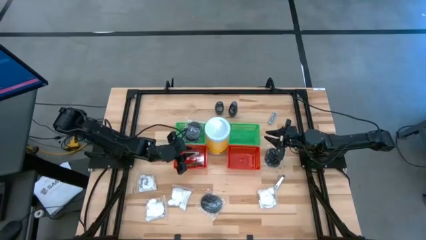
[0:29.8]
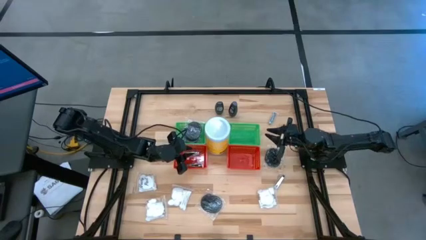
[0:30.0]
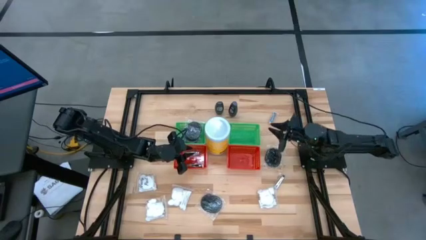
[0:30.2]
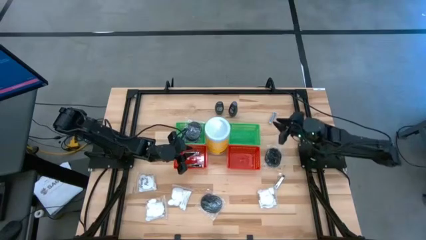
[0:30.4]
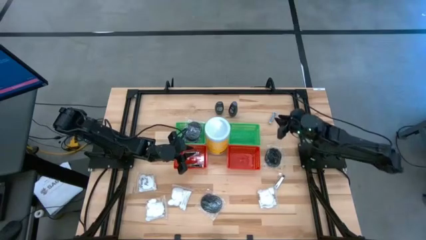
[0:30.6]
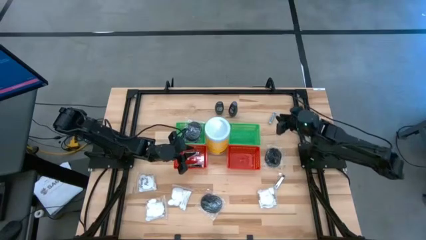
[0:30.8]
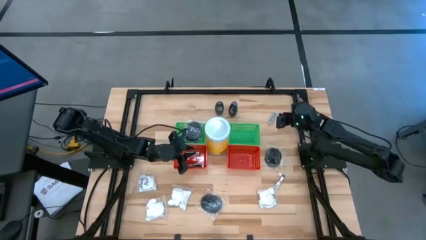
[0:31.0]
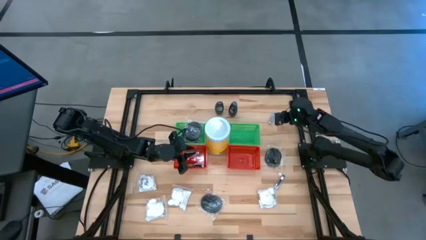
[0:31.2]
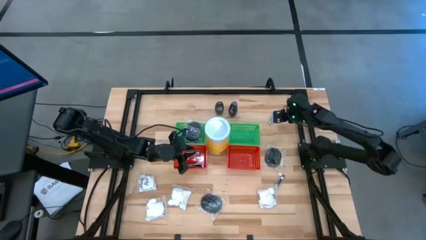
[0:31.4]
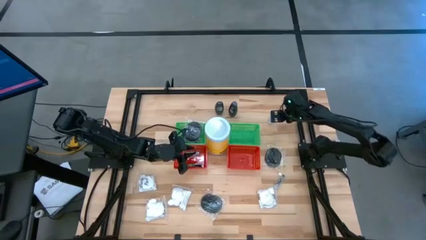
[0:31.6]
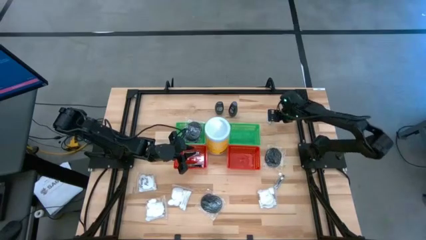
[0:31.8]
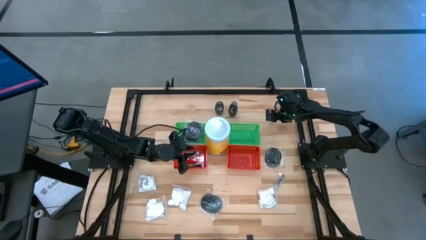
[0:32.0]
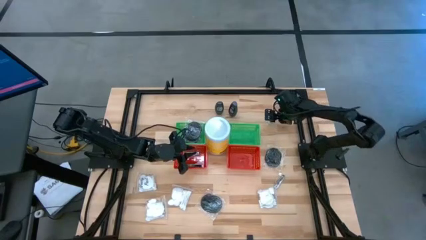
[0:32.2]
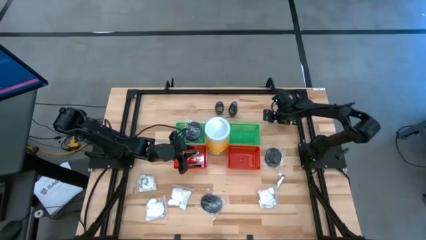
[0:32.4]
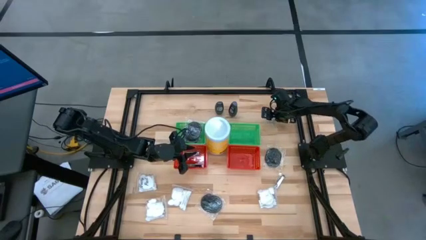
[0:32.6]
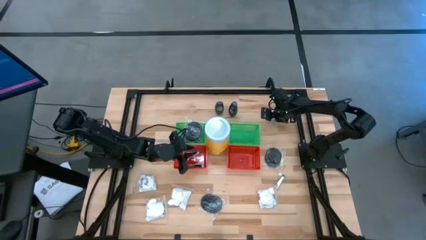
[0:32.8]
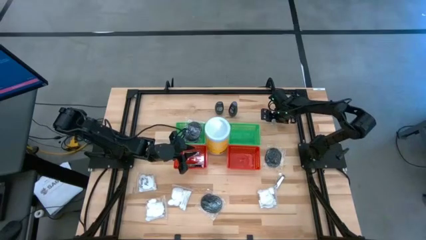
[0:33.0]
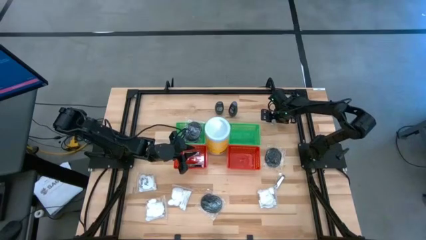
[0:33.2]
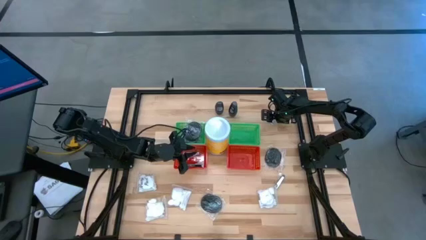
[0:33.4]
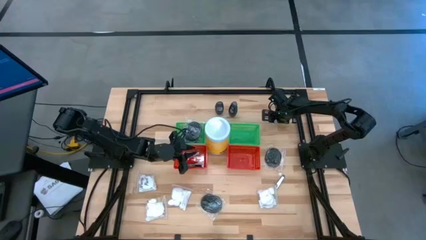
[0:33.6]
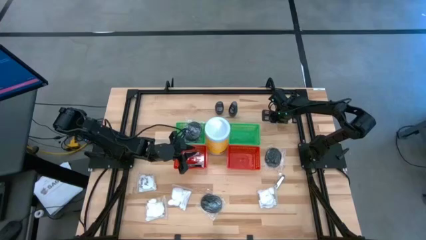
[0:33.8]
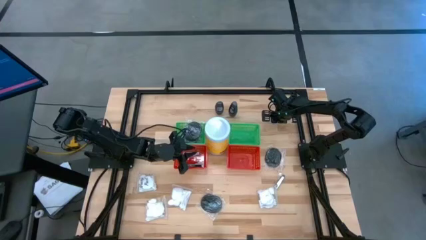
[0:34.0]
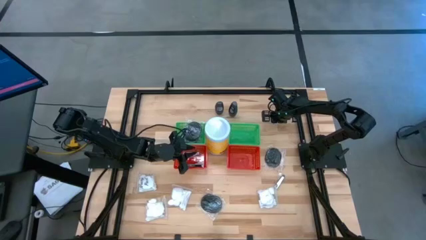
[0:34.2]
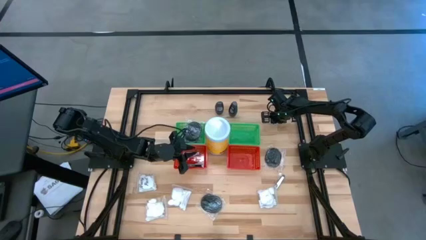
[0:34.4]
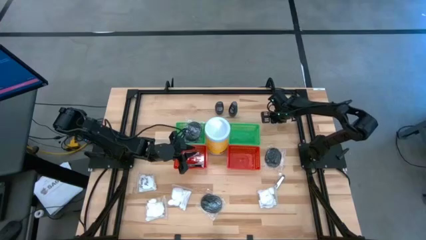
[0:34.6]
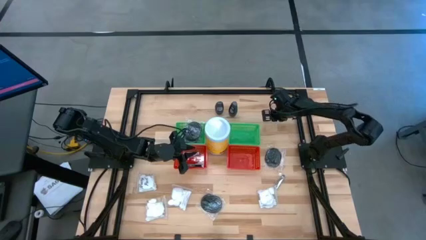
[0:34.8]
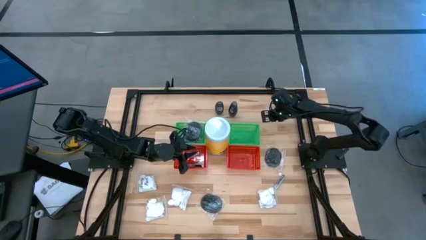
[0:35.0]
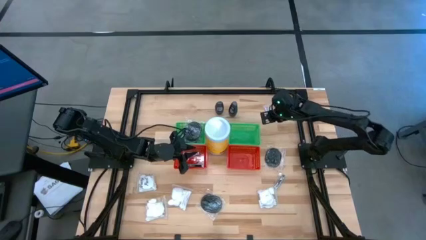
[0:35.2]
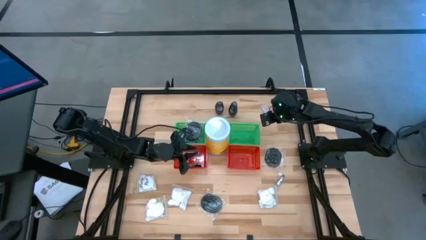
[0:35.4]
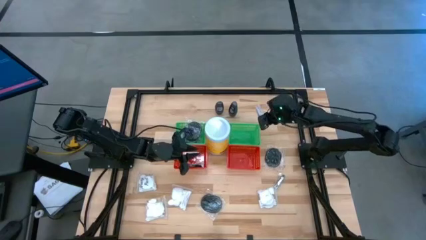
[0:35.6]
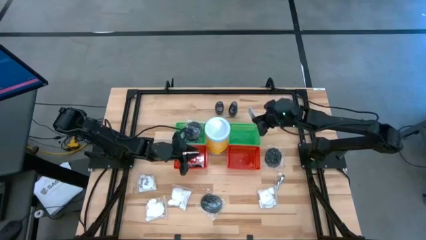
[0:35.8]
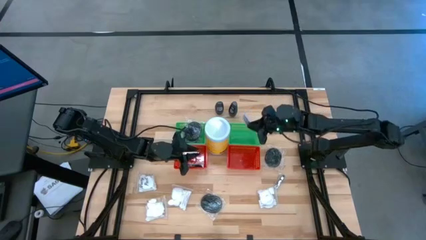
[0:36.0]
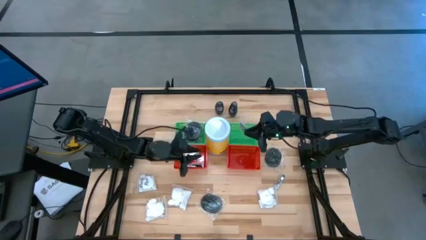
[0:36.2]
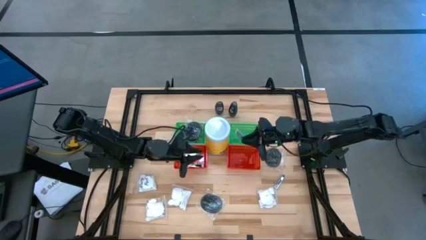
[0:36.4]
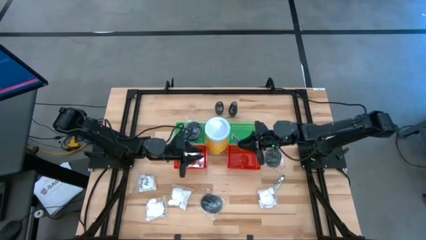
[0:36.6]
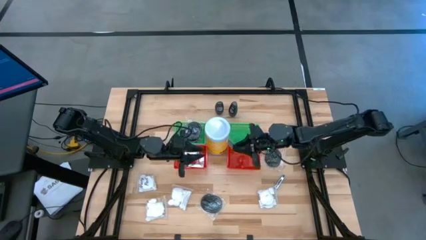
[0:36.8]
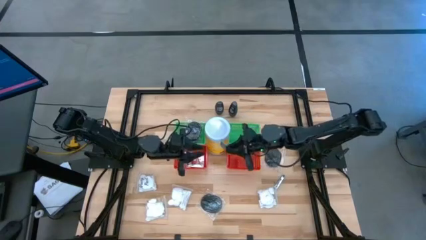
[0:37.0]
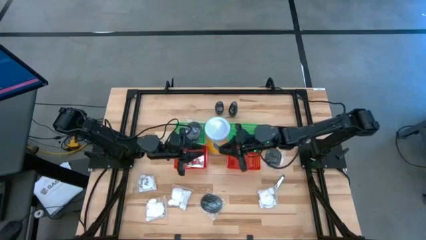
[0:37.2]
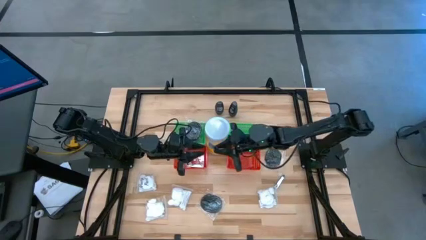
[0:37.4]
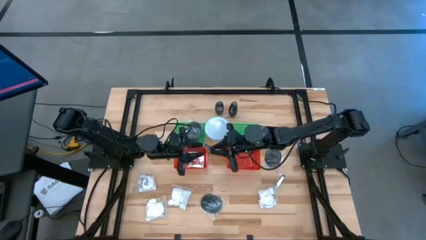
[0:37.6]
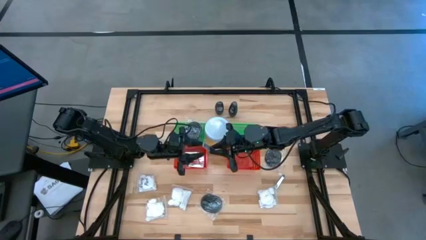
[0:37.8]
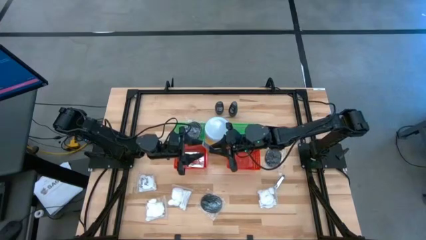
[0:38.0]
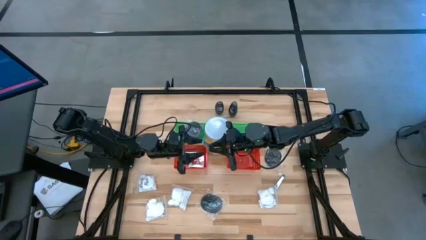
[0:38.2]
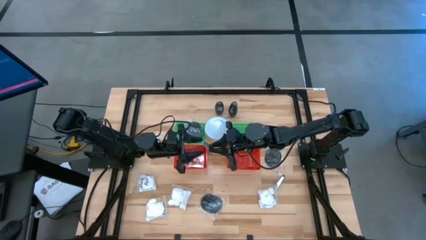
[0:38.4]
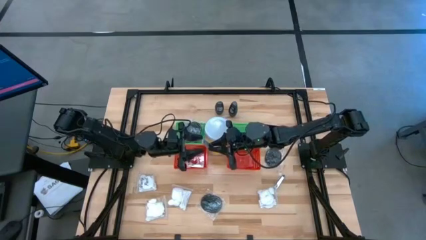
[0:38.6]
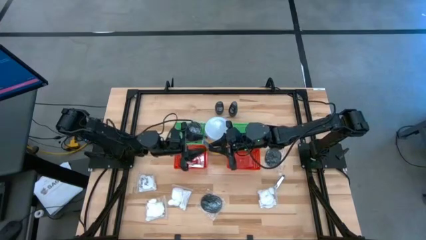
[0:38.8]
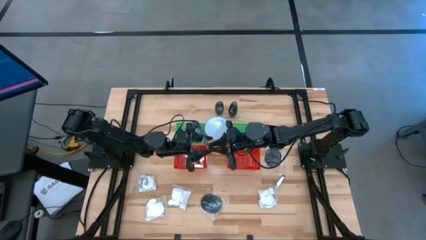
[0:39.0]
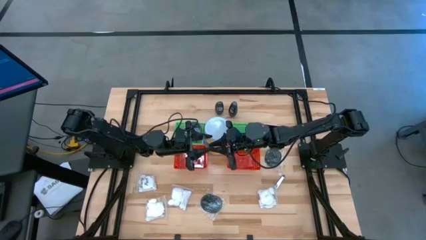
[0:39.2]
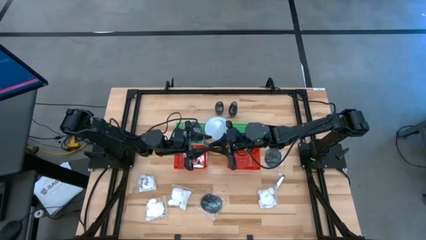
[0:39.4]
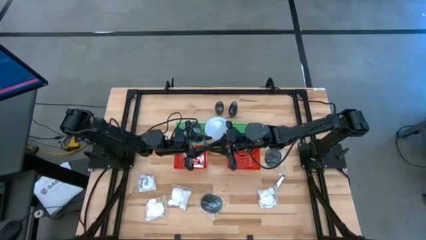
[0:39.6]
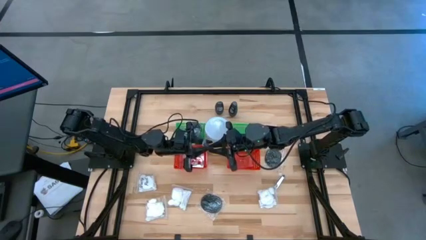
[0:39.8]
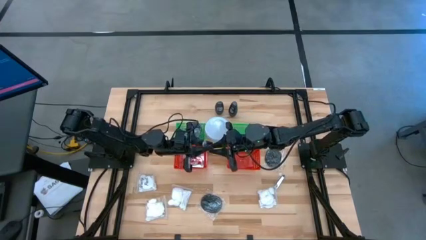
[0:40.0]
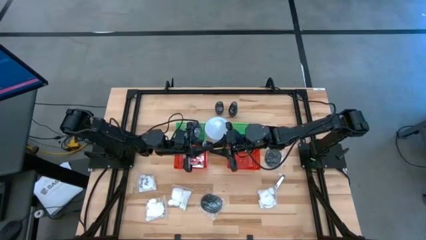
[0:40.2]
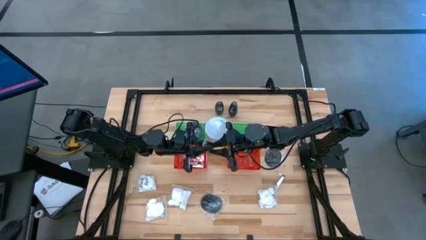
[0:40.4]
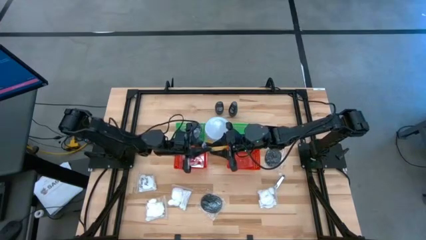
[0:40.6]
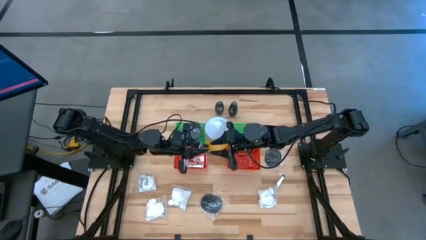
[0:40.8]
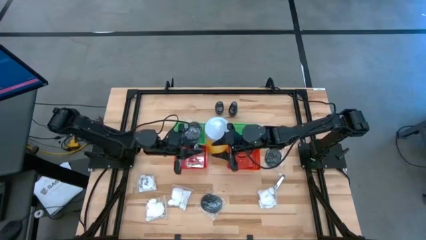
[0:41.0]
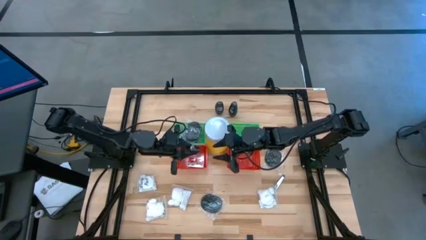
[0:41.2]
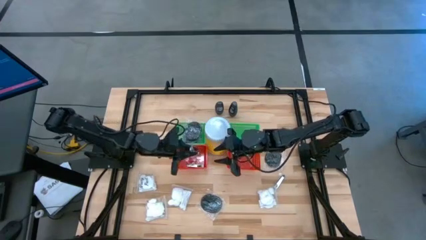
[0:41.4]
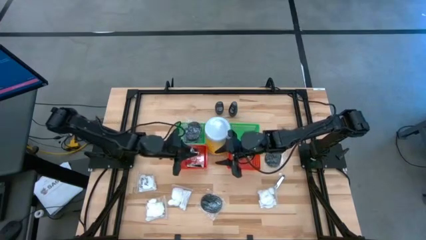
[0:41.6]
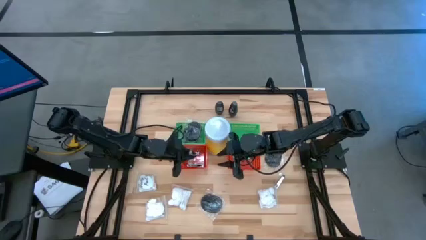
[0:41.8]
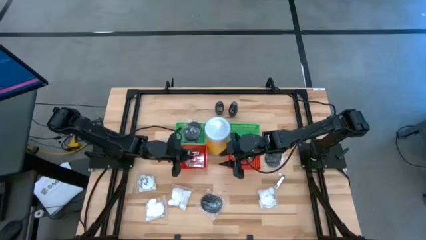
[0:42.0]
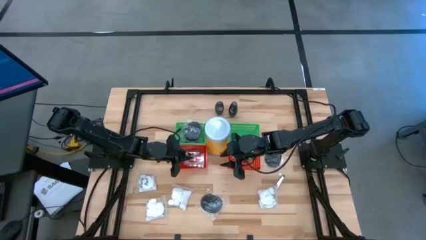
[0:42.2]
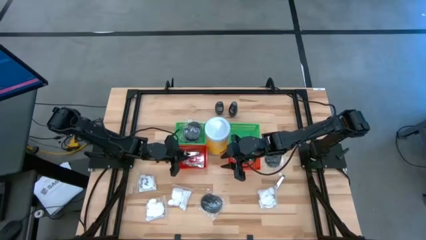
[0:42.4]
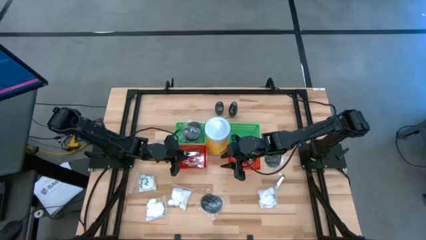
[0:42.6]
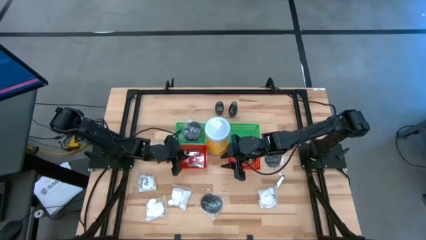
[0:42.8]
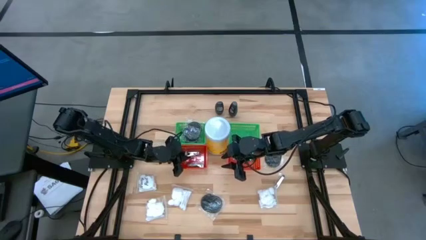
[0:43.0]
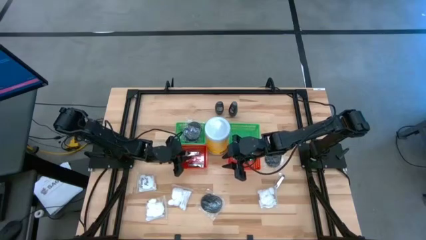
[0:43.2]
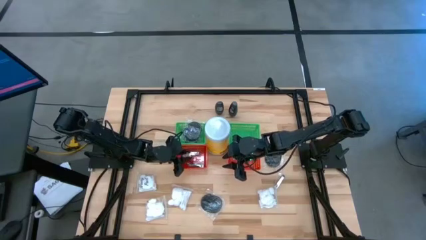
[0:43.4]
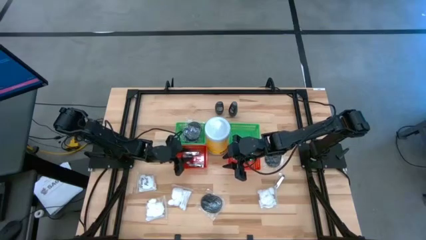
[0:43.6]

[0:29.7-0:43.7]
Task: Pick & Place Travel size toiletries
Put the top nail cutter into the left red basket
